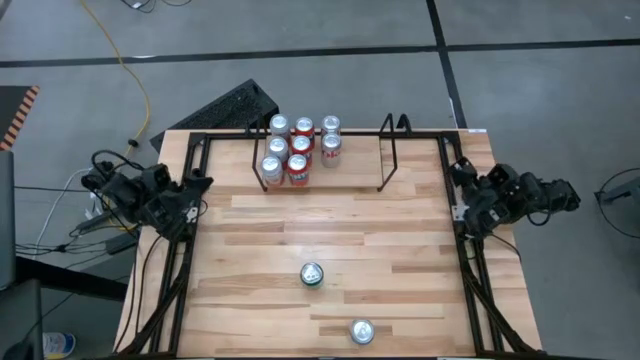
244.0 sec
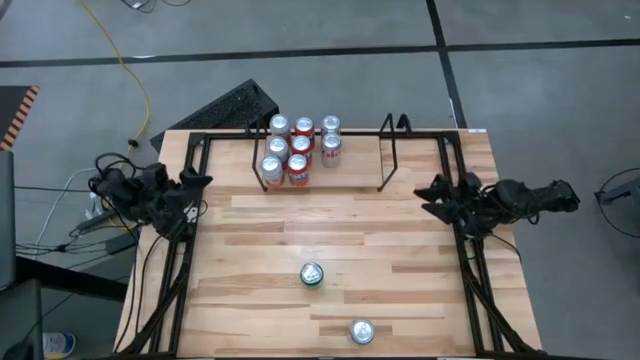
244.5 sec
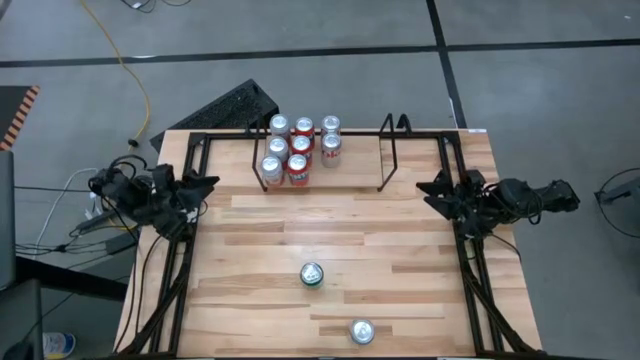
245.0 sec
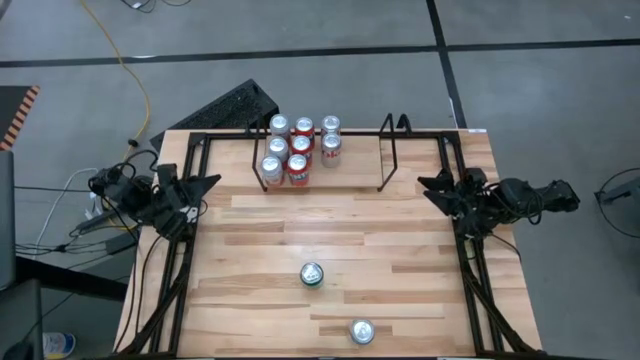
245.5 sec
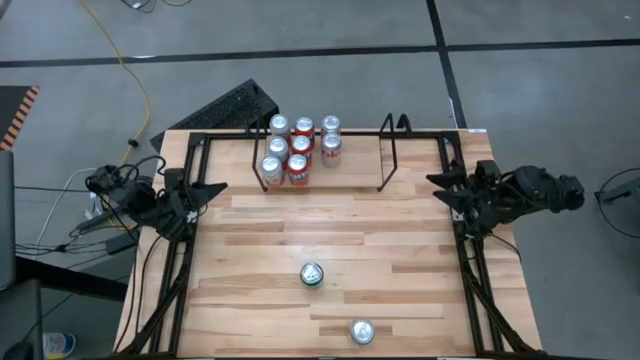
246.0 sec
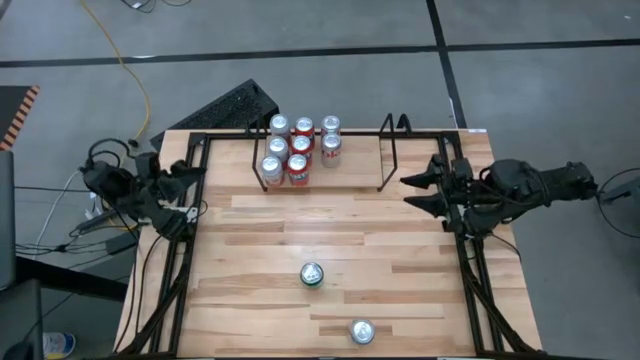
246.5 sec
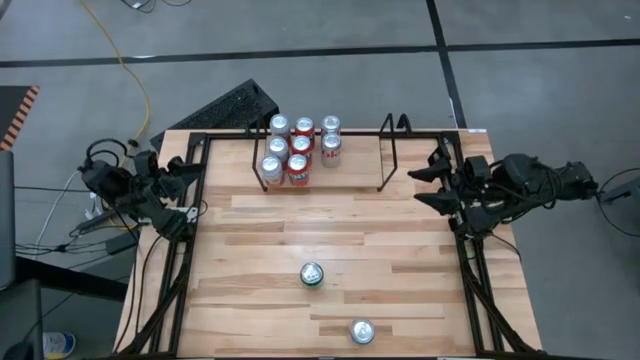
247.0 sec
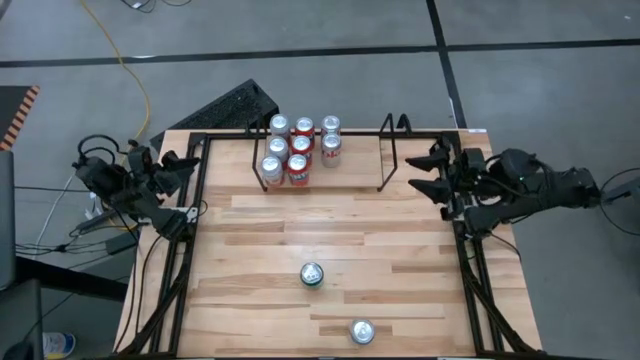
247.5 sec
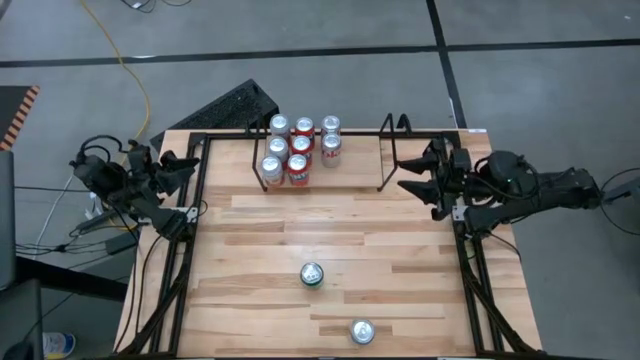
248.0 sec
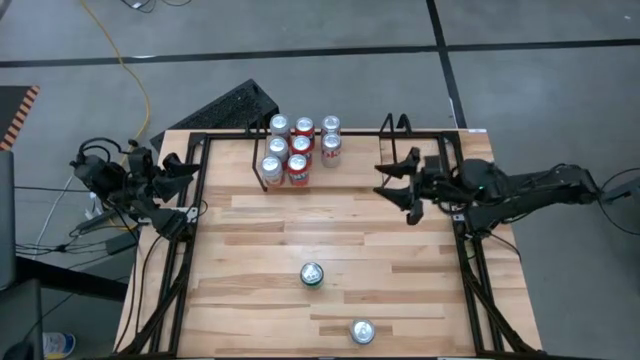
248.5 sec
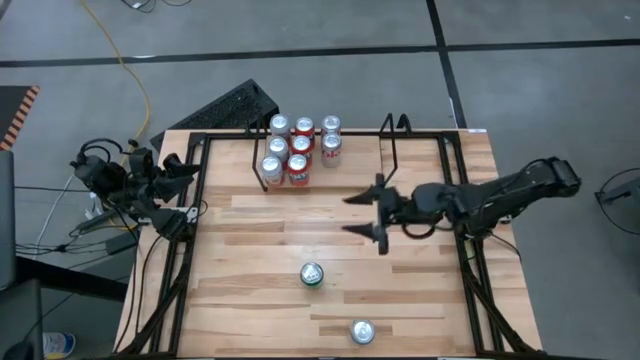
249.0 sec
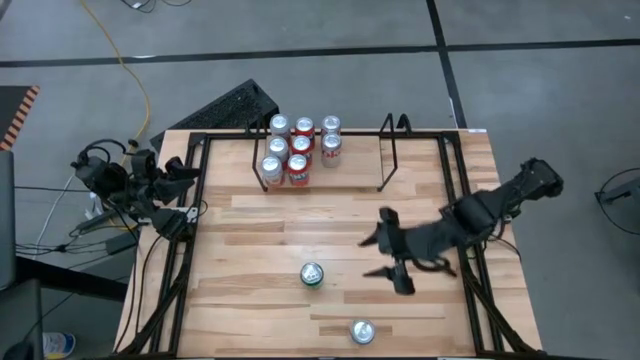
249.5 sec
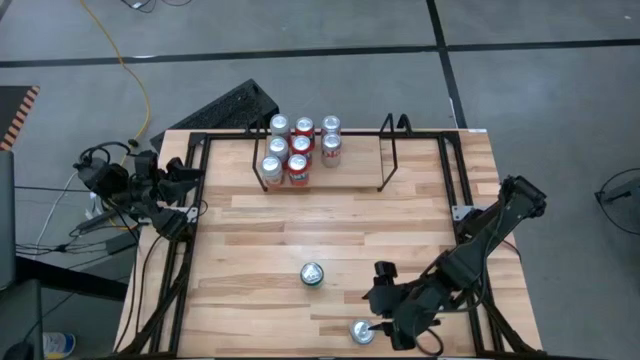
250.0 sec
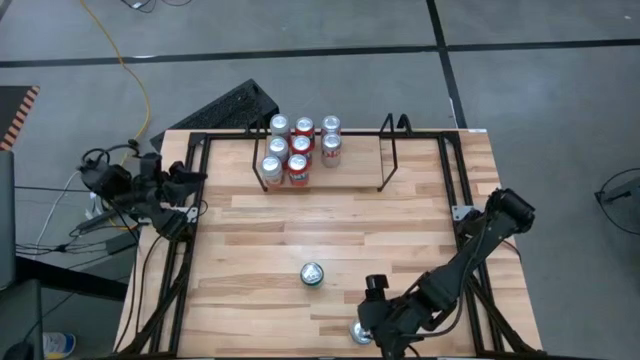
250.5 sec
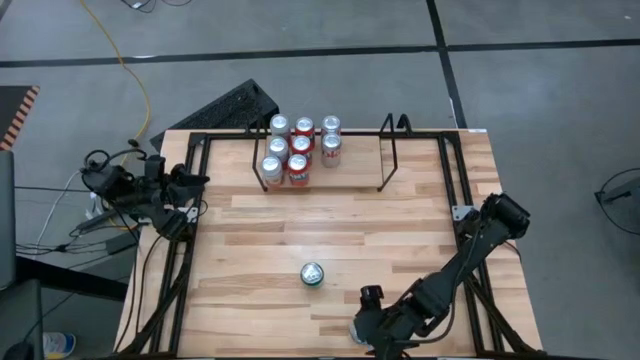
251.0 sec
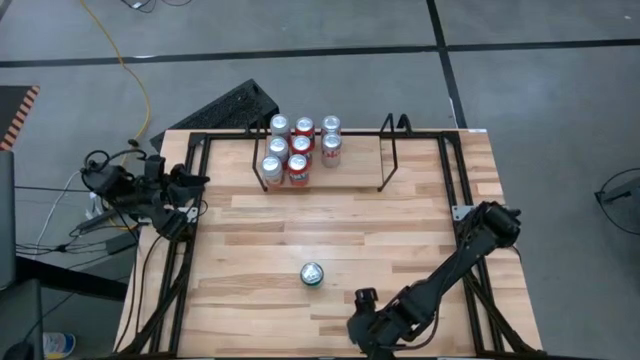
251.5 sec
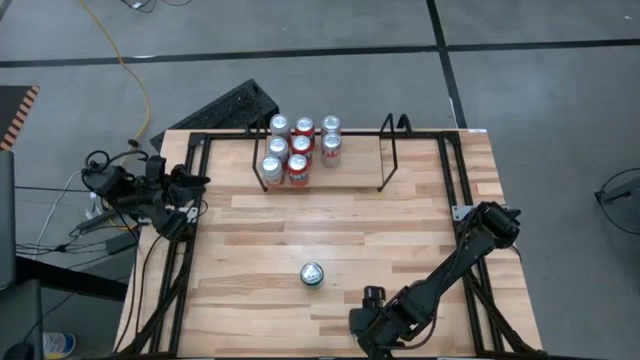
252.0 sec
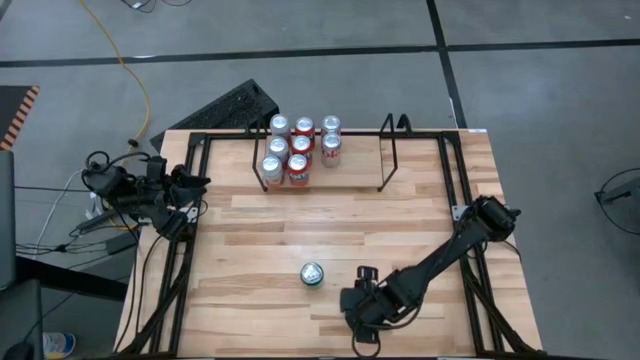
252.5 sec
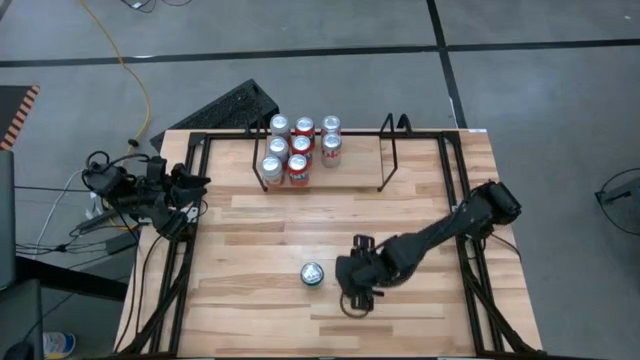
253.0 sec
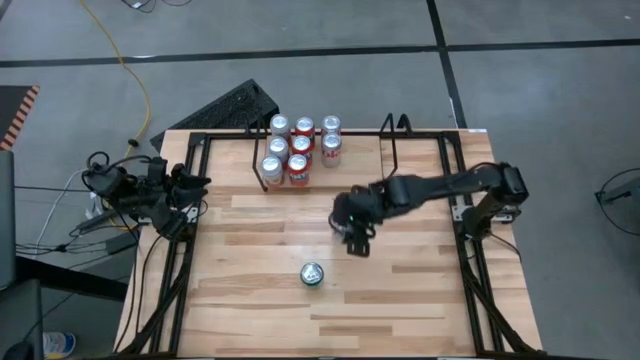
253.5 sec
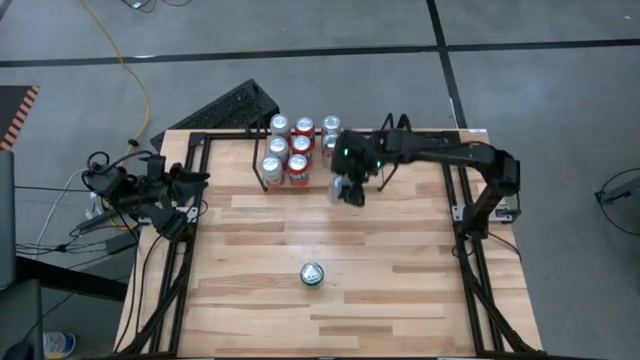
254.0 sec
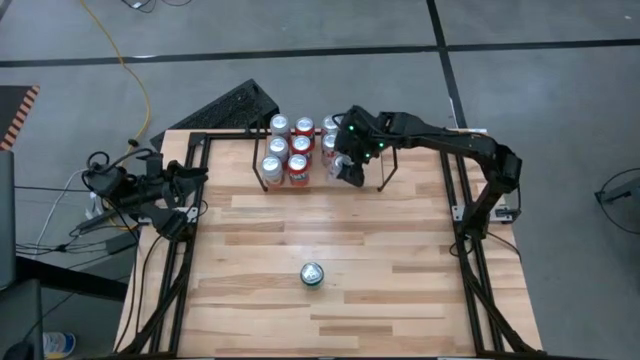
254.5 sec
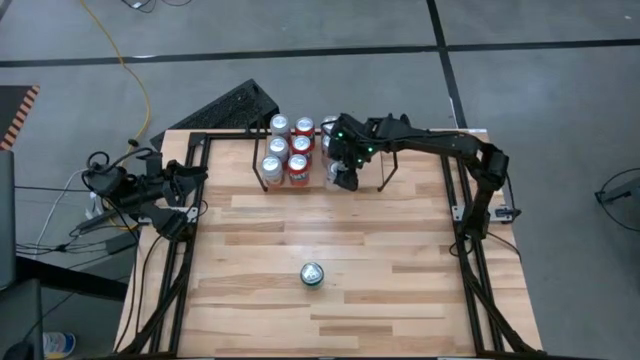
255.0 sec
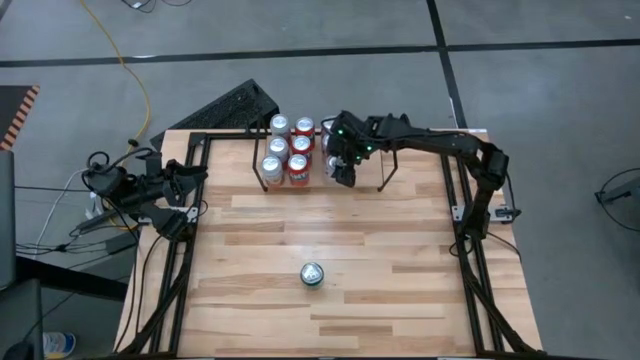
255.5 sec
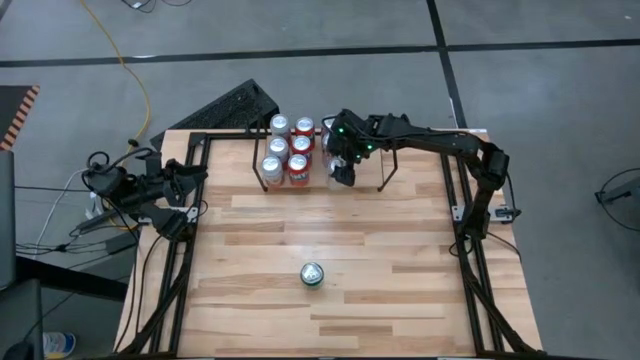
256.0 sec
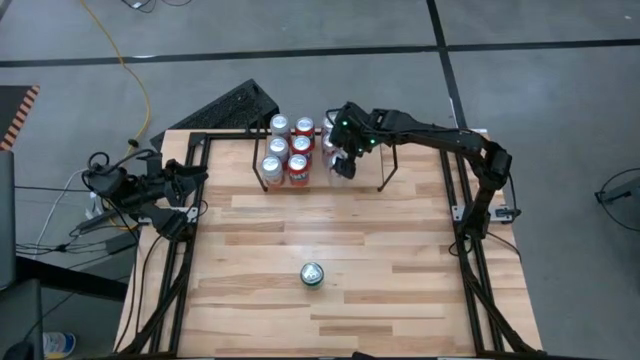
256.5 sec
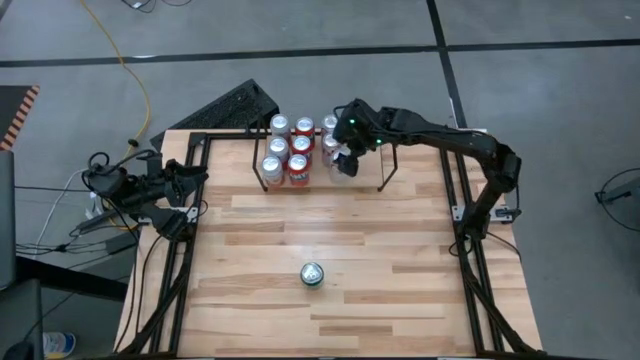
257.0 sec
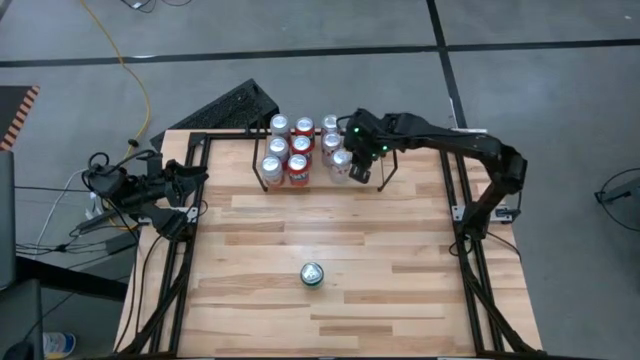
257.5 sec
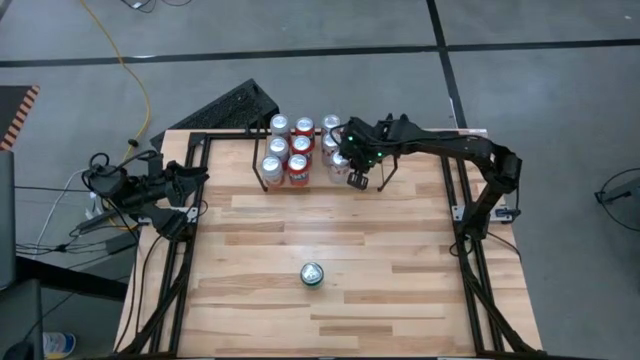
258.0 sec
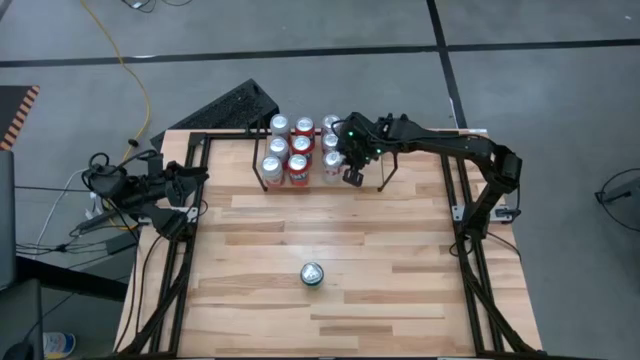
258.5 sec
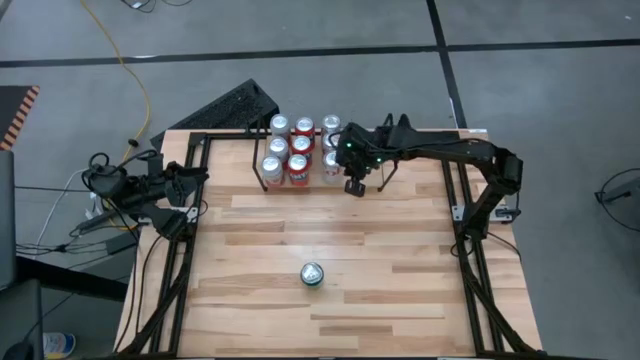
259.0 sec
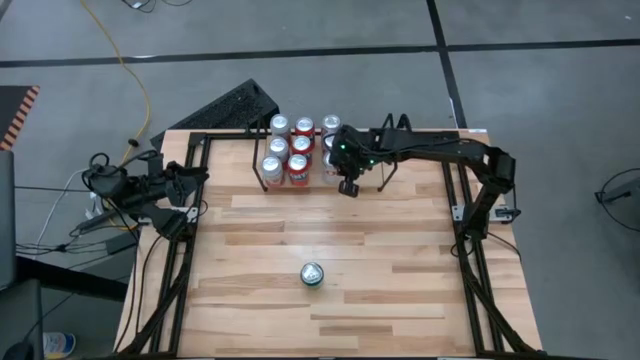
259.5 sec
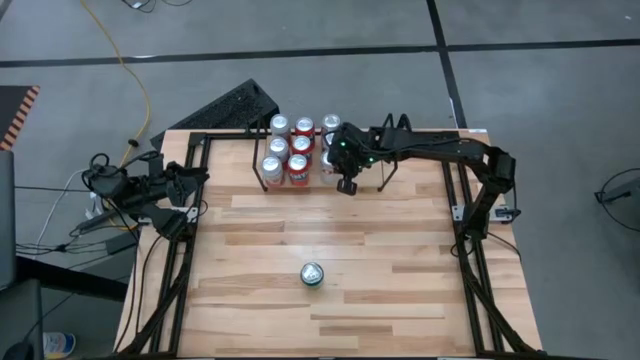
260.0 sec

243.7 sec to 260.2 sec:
Task: Place canned beverage on shelf
Put the silver soda can on the shelf aligned with the other silver soda cans
